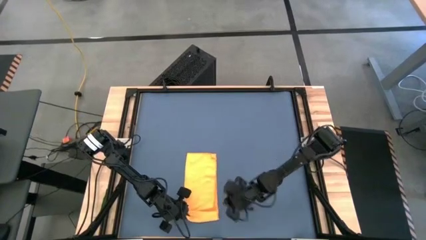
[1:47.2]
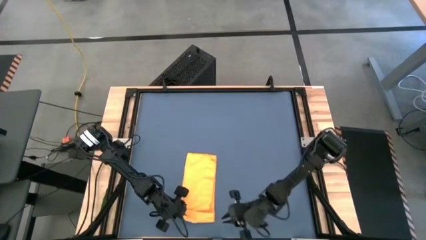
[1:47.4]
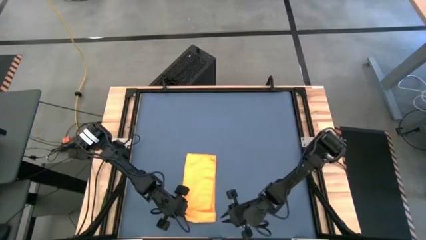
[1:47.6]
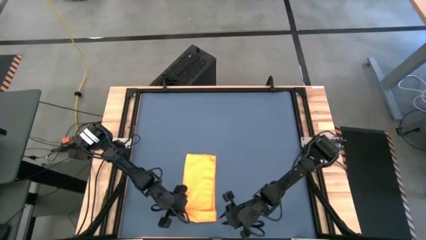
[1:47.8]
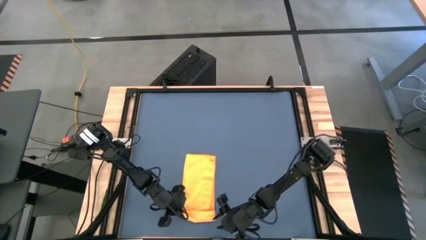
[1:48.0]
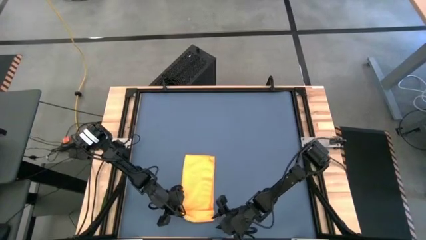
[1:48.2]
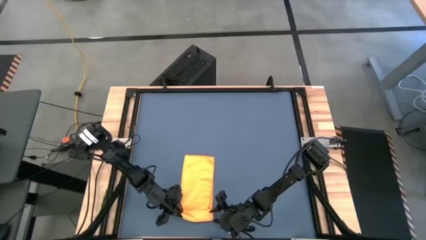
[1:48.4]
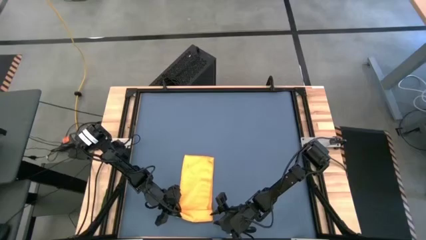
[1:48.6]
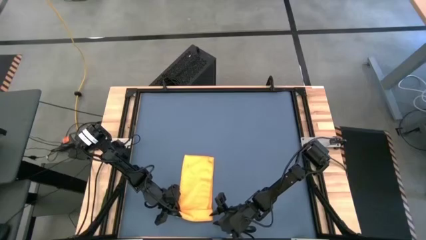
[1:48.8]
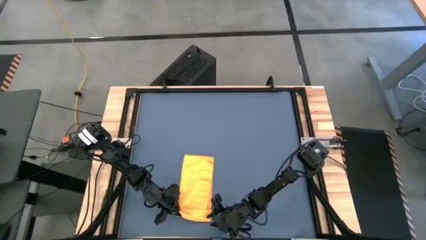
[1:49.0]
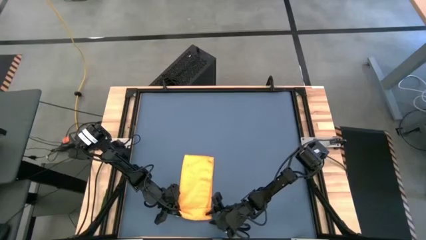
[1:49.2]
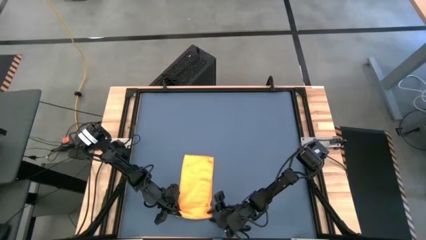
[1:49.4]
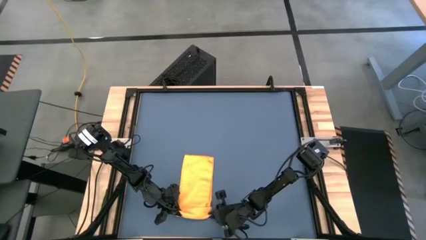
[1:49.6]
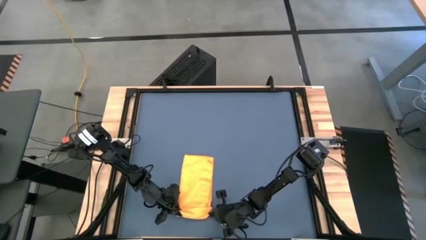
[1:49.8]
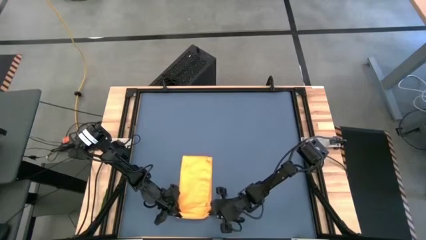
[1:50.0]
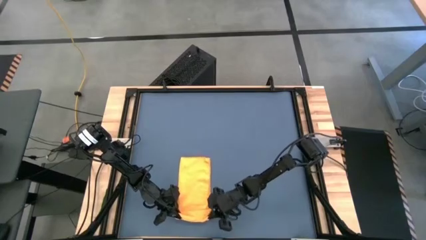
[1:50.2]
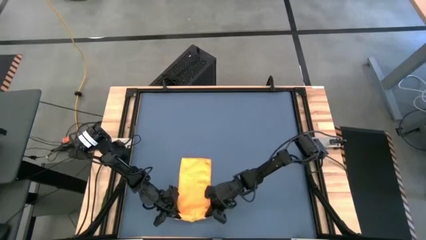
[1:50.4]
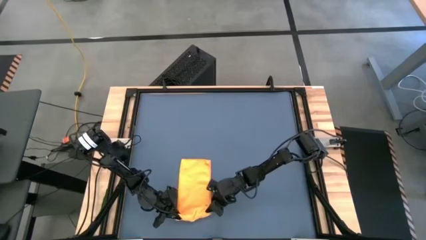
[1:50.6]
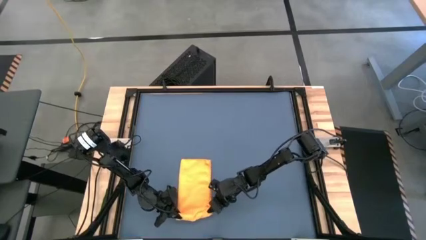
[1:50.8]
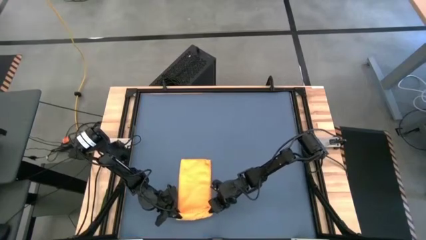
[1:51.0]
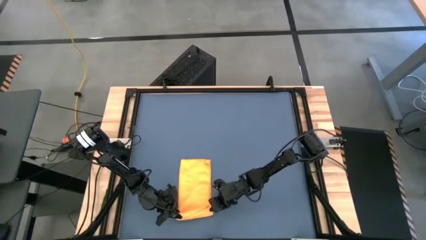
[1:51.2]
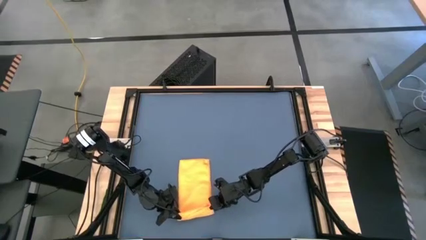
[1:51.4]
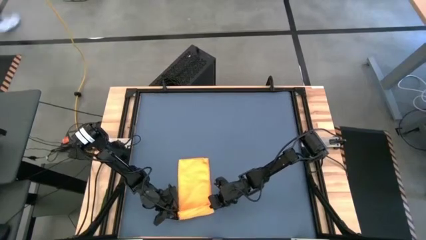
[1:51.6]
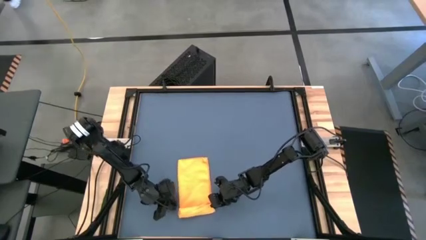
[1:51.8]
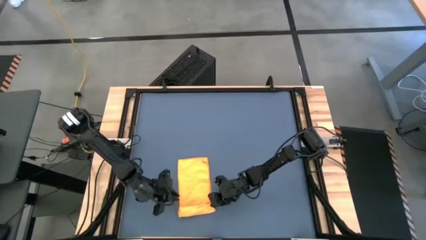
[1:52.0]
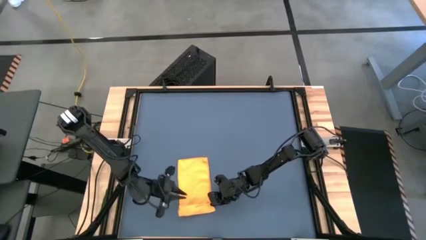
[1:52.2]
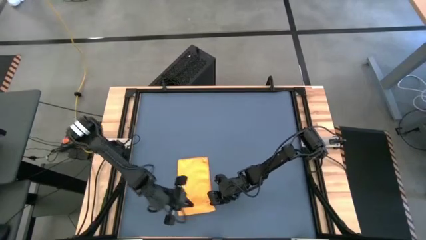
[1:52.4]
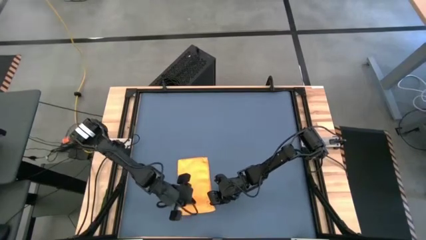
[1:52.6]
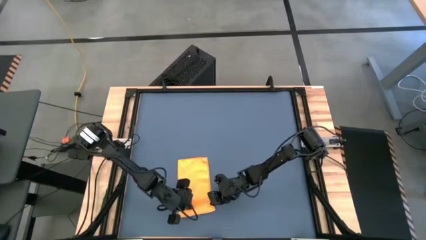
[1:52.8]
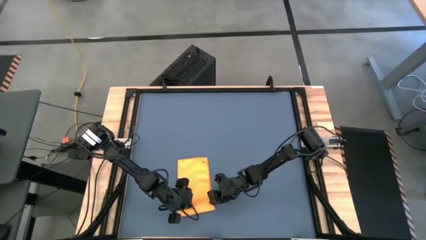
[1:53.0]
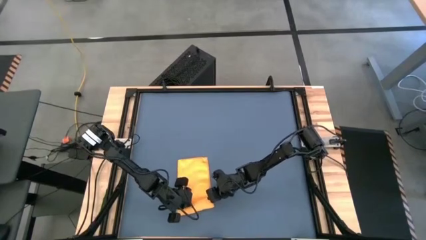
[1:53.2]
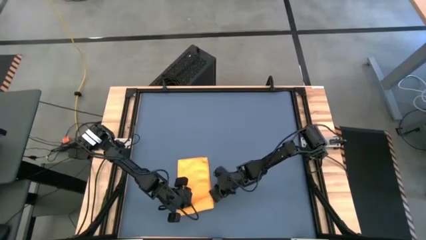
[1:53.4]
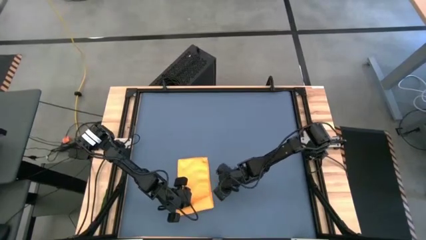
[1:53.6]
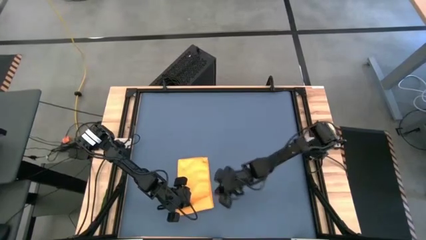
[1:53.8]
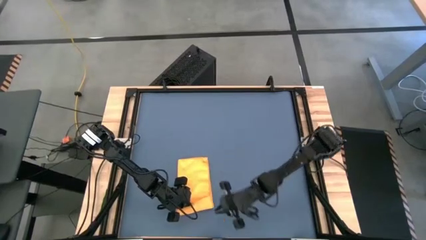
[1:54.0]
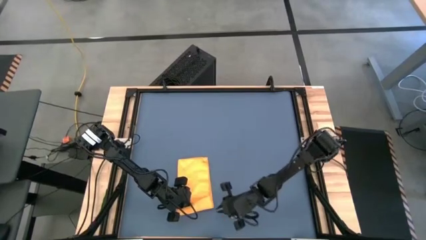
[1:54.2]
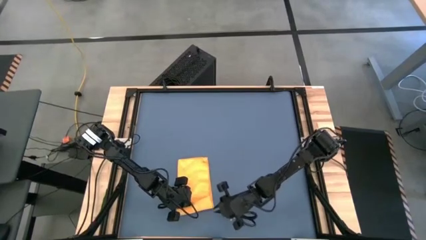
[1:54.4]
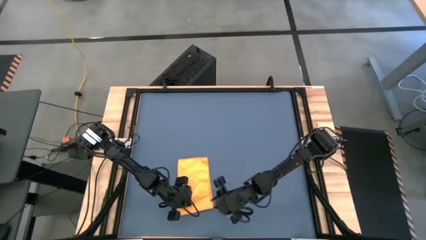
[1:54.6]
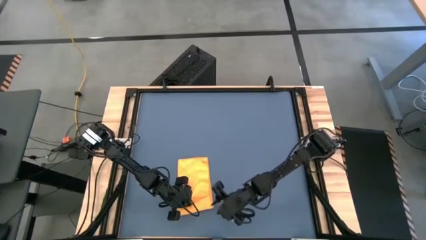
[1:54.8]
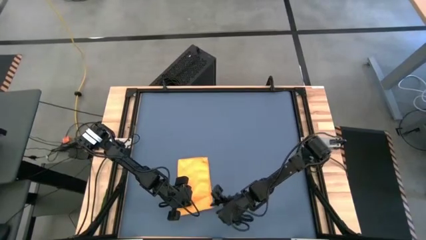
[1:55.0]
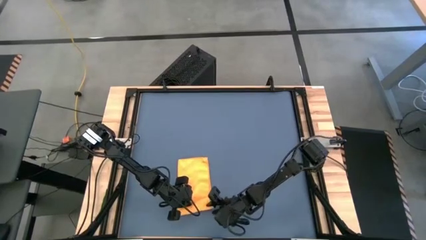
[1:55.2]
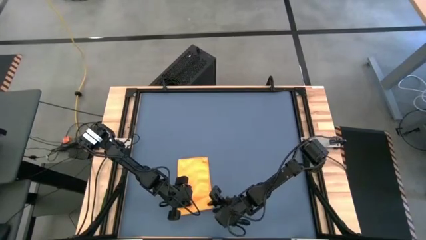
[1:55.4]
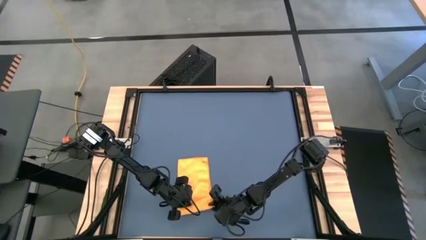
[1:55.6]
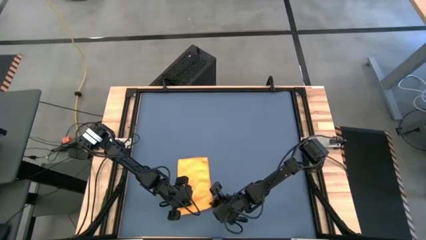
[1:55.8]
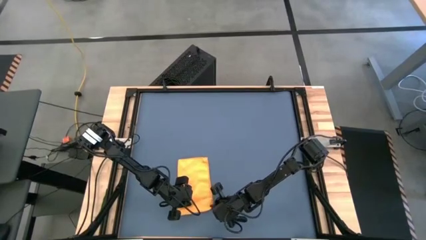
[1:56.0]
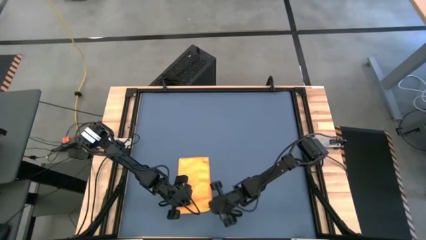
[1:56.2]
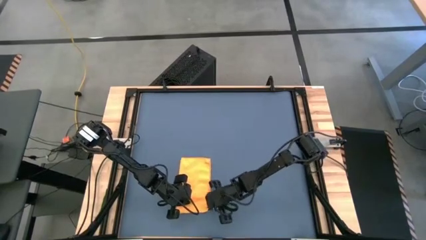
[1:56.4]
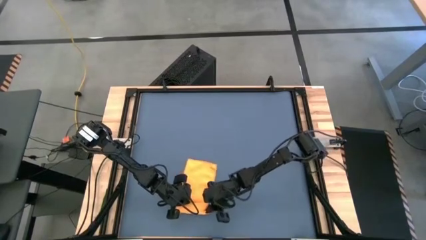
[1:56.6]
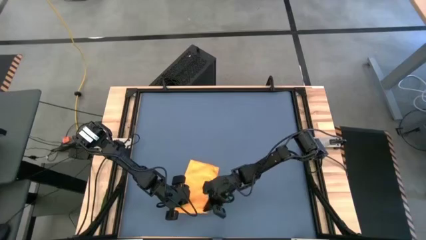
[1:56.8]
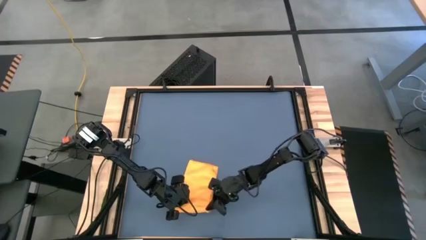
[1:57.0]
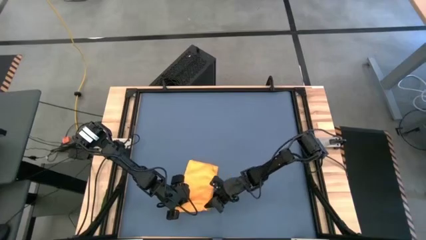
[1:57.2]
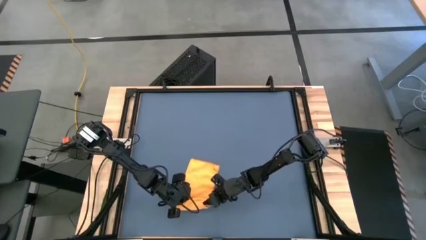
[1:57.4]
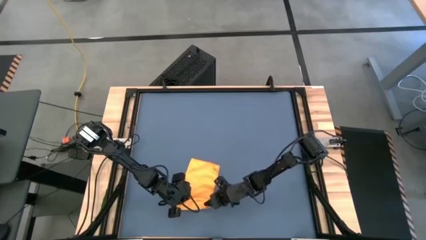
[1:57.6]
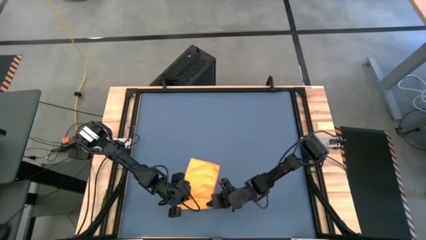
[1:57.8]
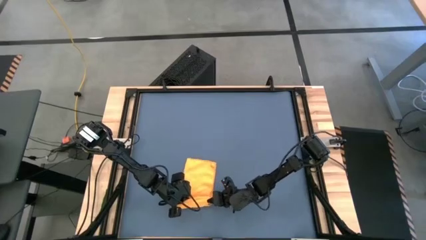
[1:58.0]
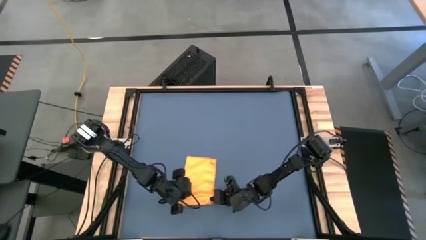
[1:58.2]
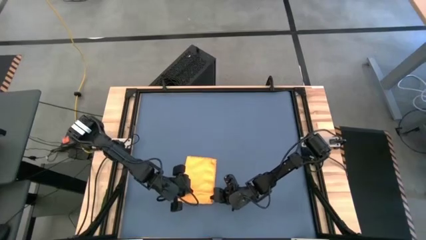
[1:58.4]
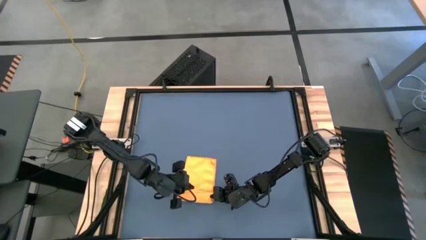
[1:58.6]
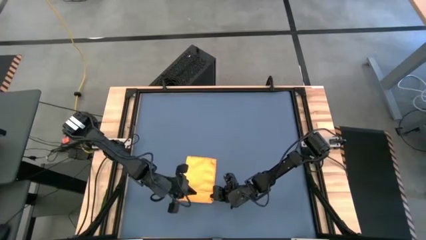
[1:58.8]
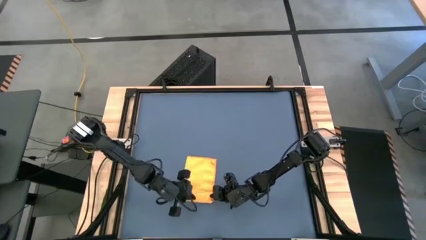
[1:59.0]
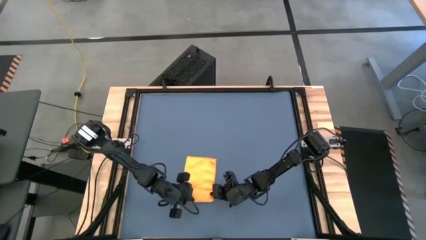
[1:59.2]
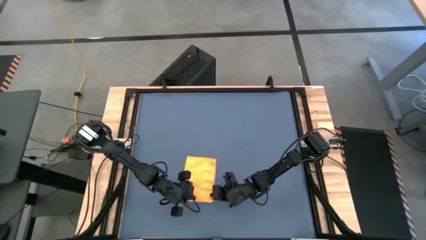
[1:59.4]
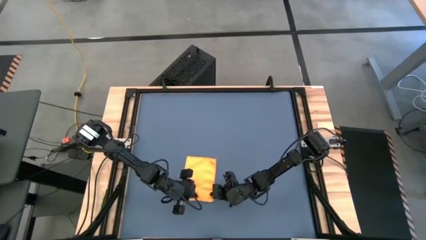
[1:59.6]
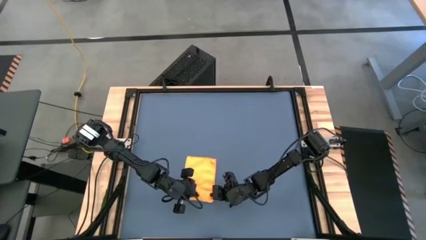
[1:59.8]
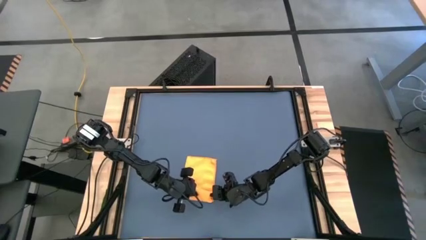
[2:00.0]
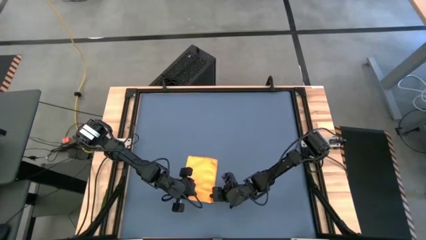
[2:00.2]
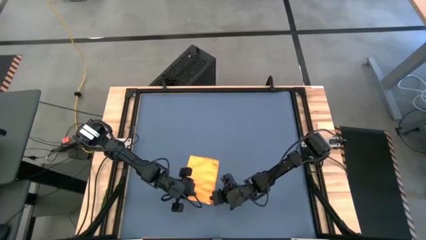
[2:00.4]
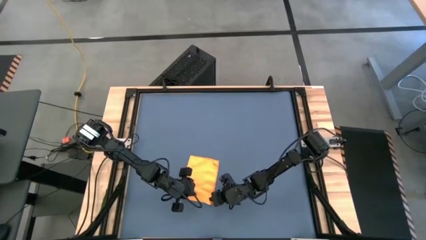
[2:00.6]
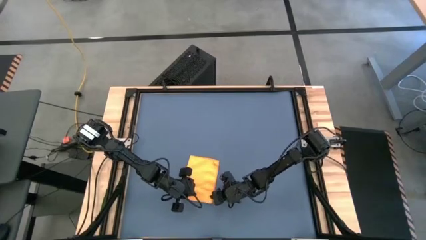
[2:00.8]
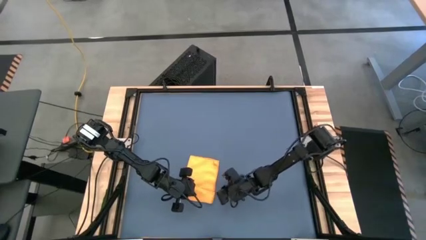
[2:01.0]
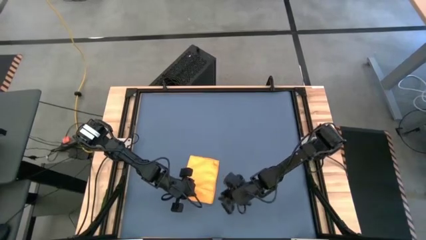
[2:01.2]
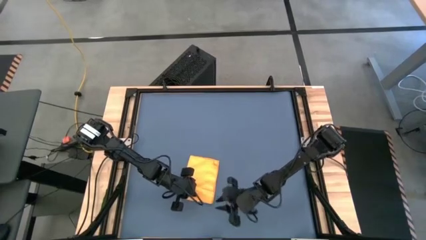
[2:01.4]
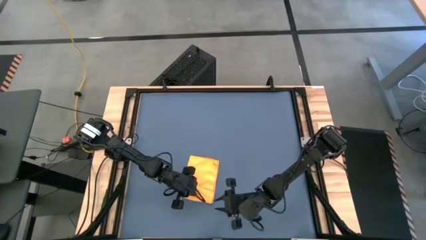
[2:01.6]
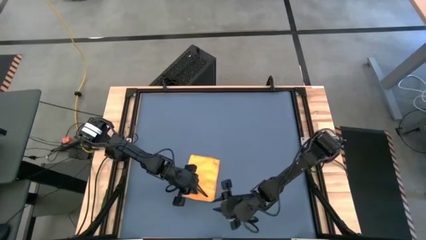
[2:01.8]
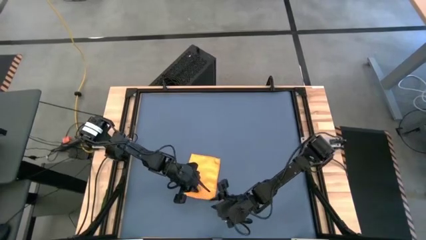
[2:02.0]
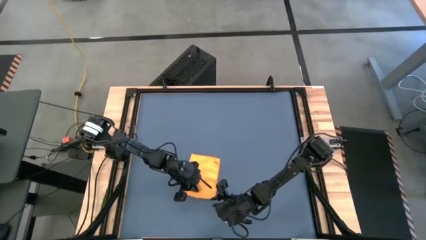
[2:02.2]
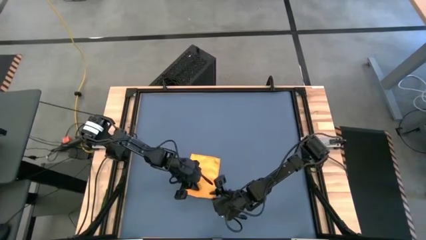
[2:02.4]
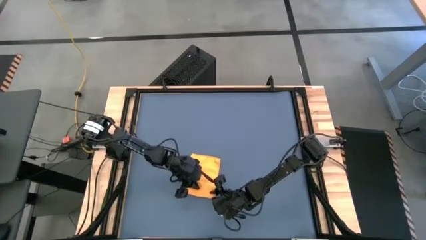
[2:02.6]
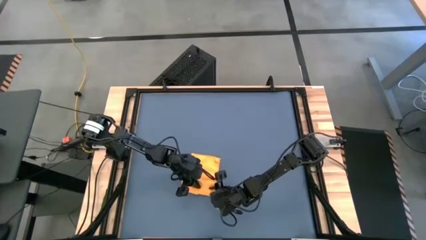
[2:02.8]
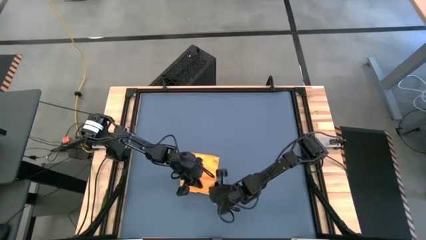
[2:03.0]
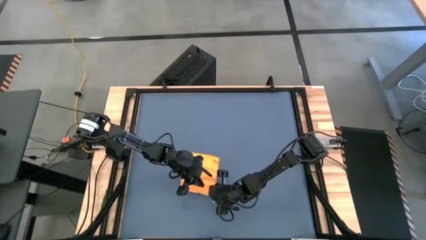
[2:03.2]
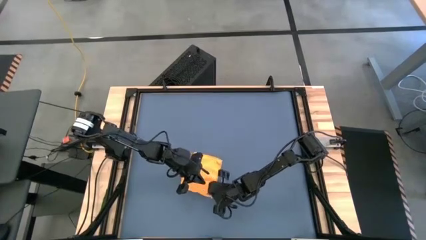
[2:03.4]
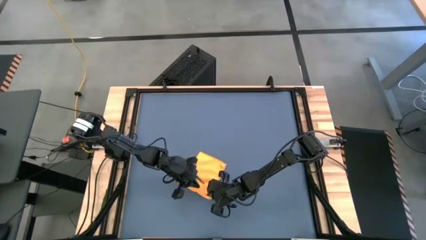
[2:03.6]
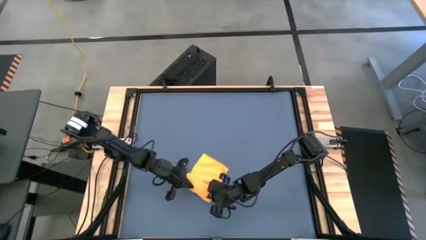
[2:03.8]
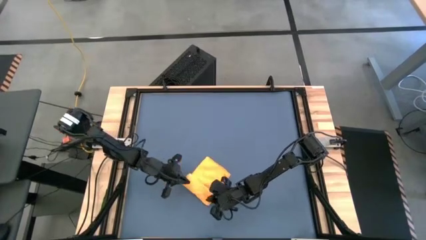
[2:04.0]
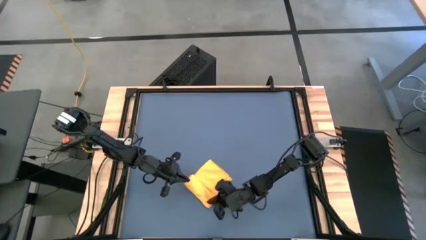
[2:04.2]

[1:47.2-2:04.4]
Task: Roll towel
Roll the yellow towel
